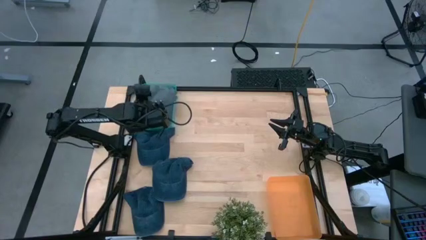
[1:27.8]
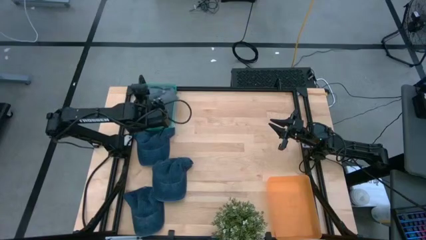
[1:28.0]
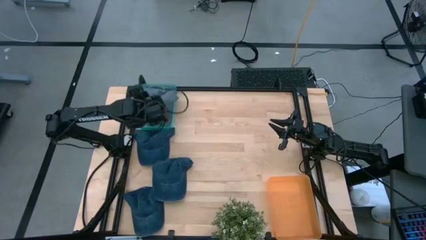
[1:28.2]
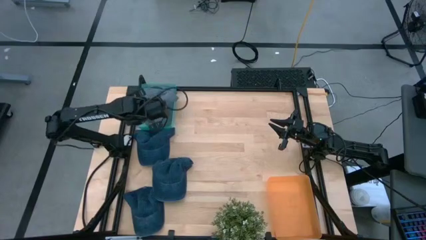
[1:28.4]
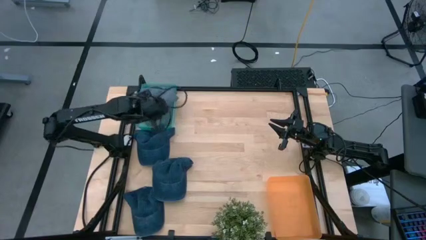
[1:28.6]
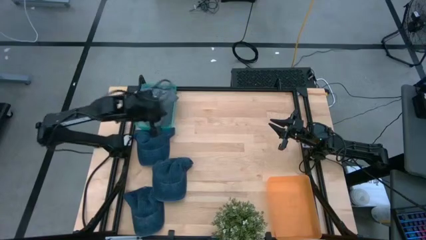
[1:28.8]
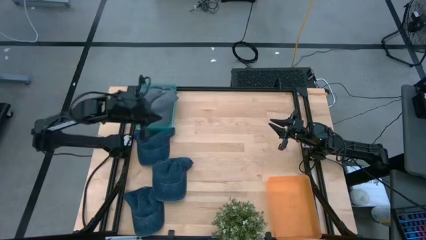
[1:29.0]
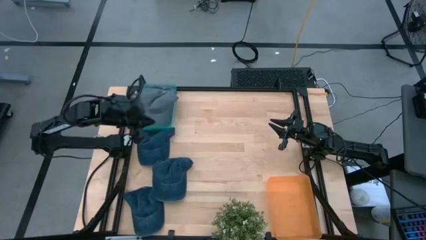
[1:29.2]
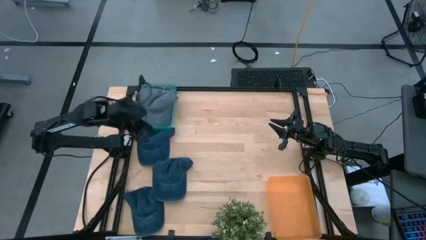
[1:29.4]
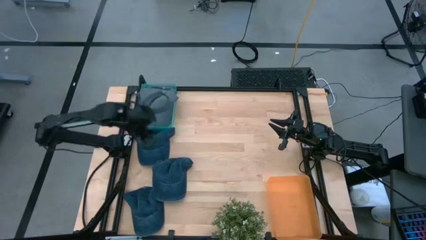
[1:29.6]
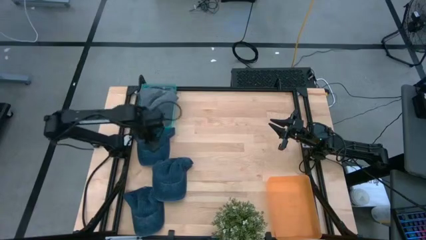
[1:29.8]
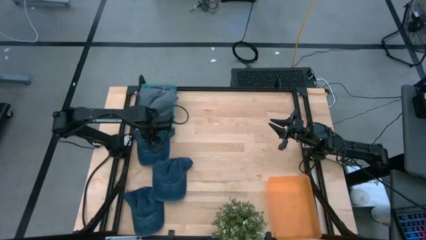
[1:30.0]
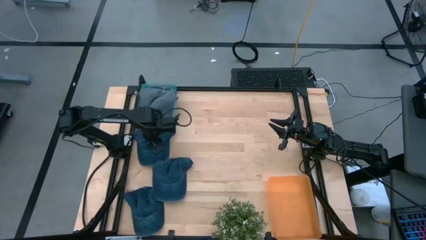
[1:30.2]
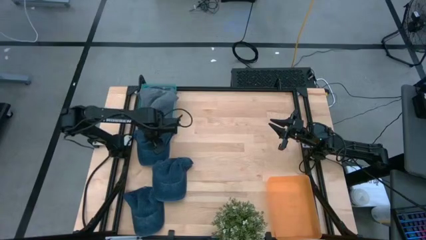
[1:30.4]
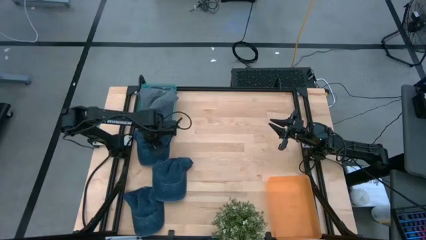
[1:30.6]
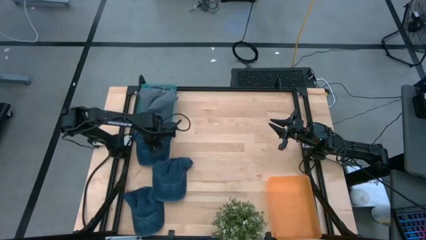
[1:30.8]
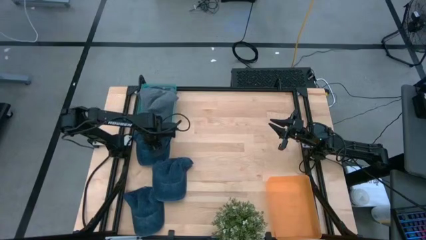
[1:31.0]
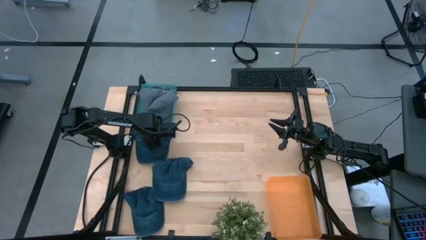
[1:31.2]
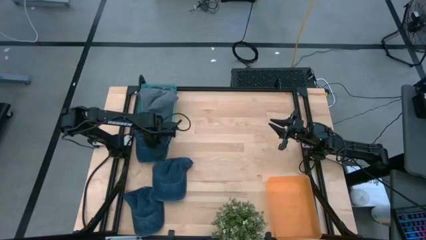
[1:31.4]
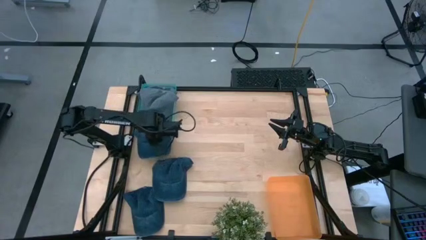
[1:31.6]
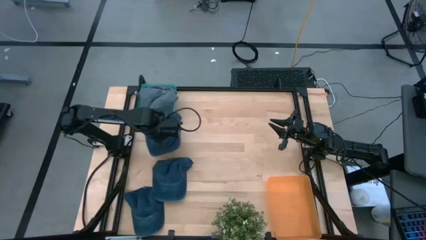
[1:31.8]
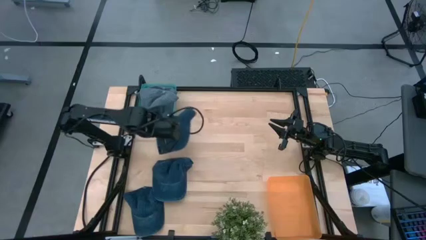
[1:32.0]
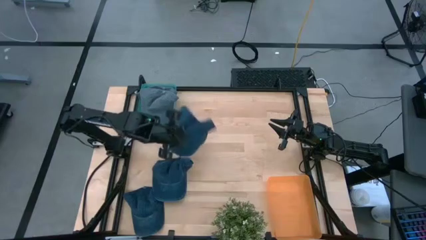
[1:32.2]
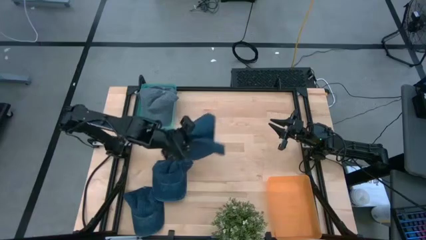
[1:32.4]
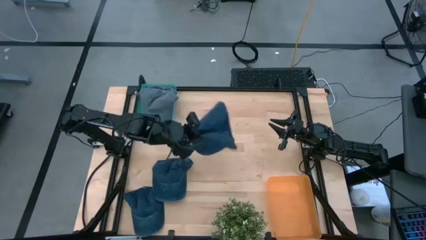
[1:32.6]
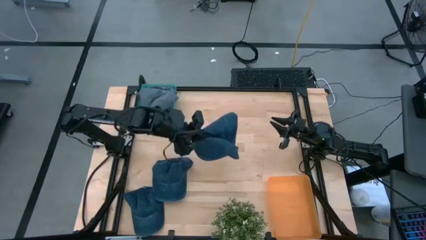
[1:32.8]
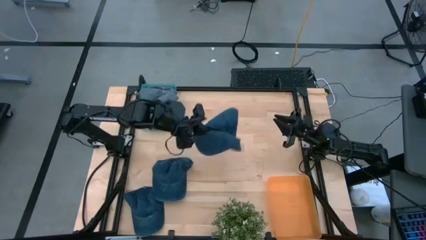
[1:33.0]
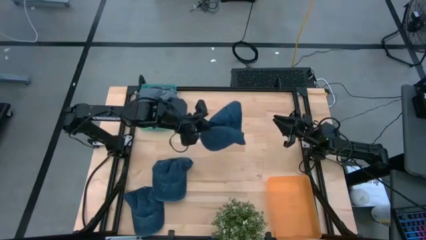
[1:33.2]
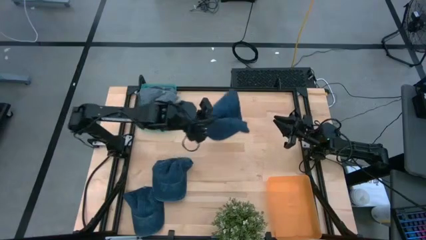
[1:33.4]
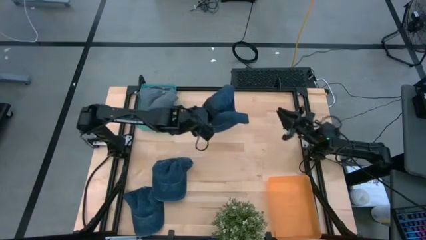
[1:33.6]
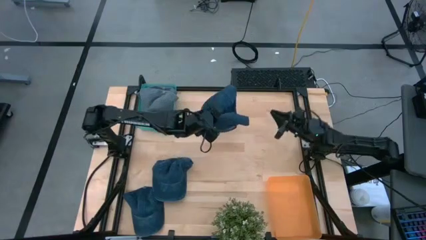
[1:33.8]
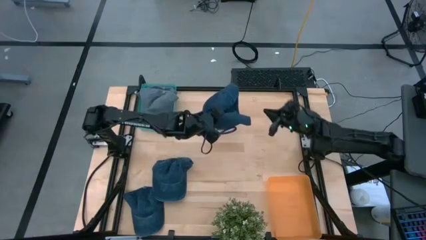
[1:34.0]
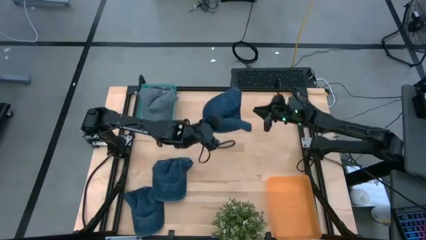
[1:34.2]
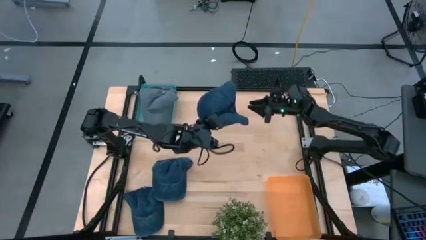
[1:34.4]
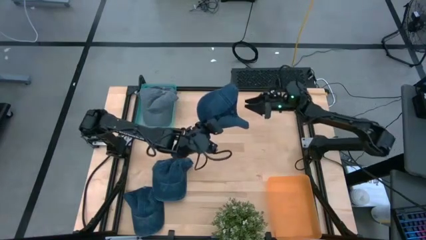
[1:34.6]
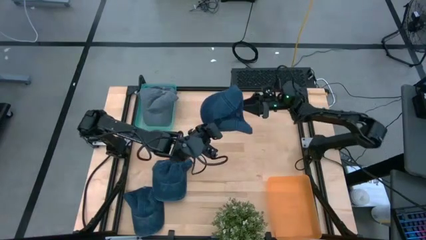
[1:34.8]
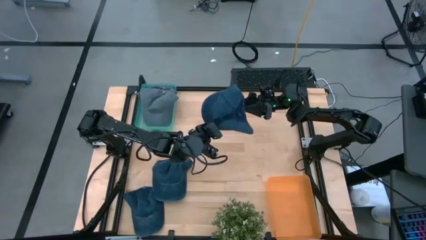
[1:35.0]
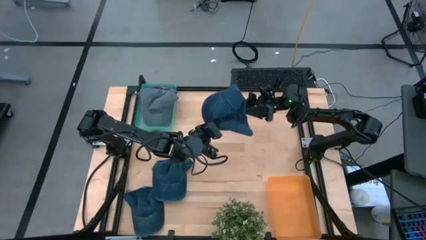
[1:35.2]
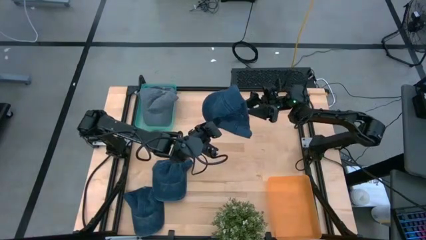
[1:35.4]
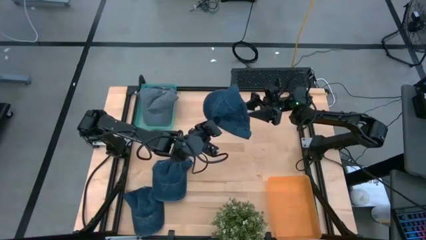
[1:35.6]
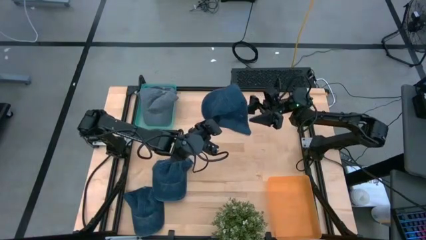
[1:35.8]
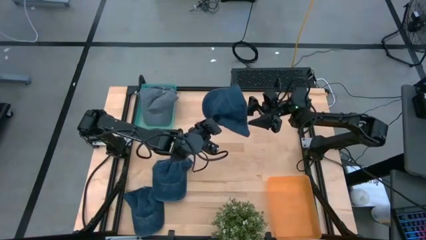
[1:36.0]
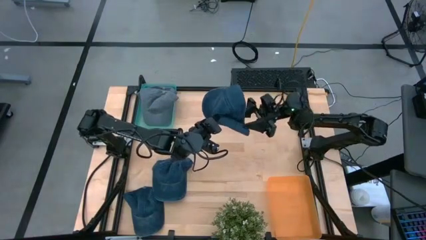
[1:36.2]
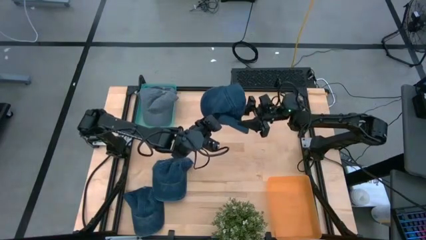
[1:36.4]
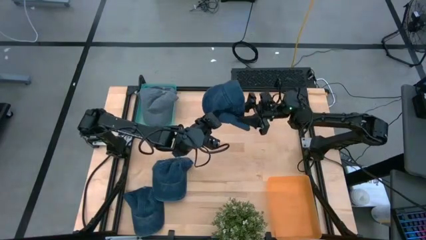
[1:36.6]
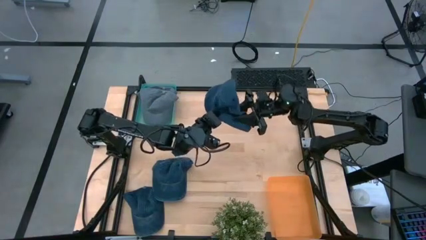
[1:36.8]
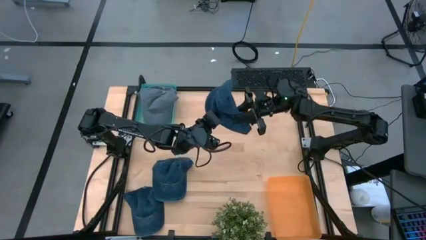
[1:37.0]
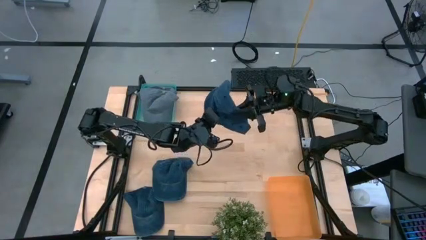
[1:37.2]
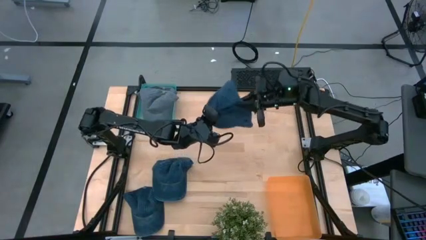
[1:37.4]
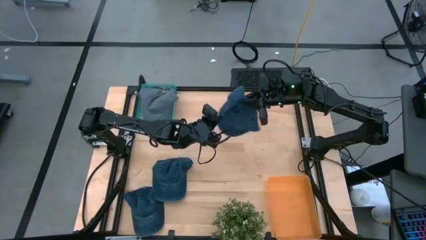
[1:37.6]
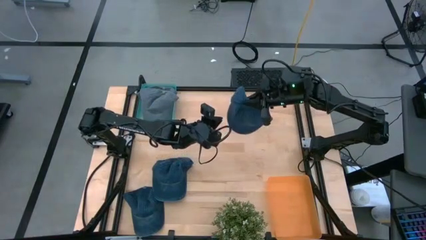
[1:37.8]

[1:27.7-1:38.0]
Task: Pick & Place hat
Put the top blue cap into the orange bin

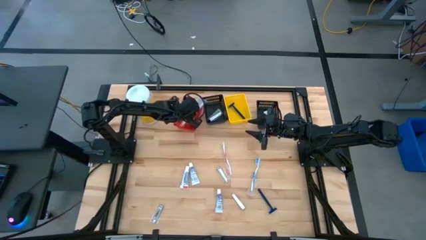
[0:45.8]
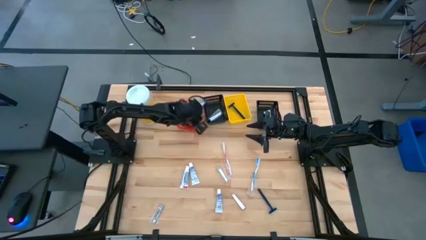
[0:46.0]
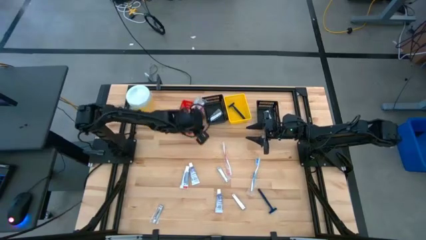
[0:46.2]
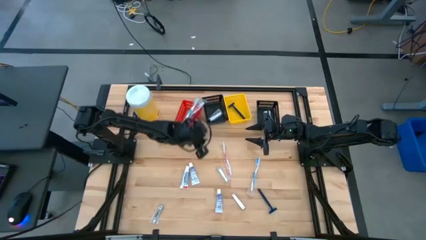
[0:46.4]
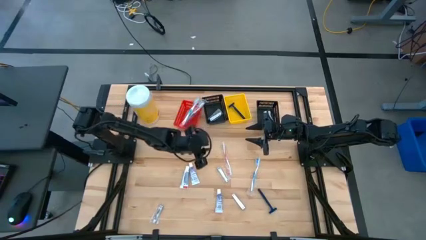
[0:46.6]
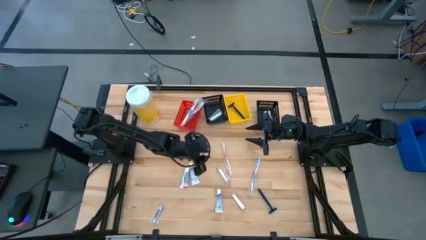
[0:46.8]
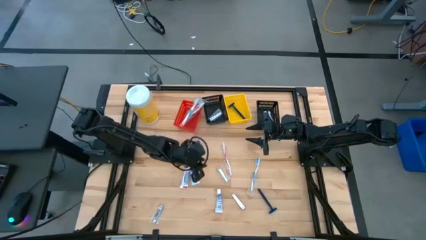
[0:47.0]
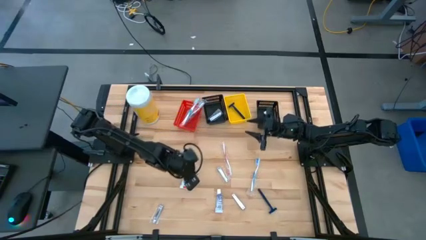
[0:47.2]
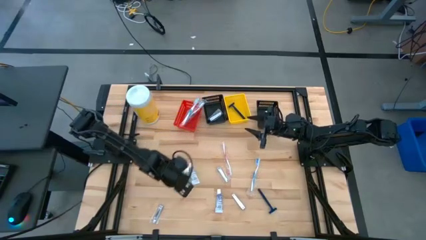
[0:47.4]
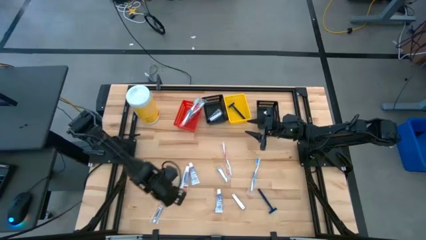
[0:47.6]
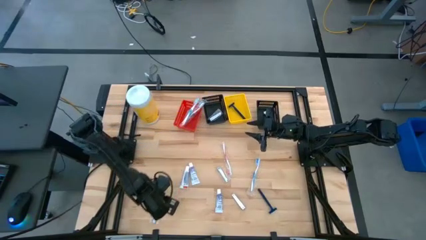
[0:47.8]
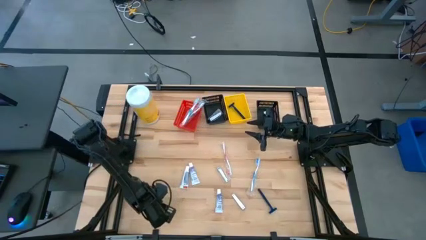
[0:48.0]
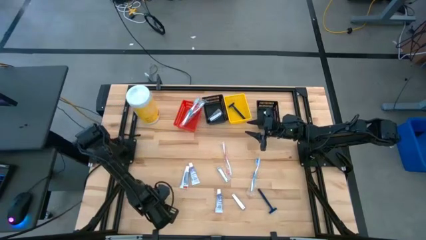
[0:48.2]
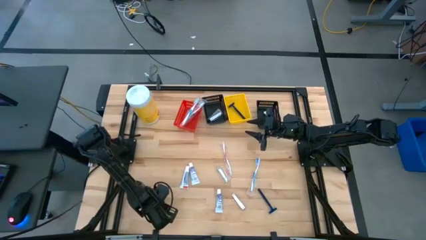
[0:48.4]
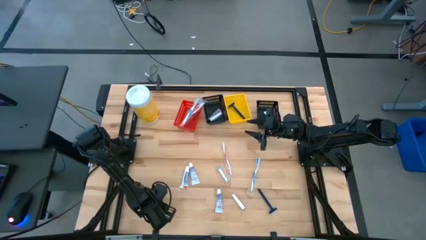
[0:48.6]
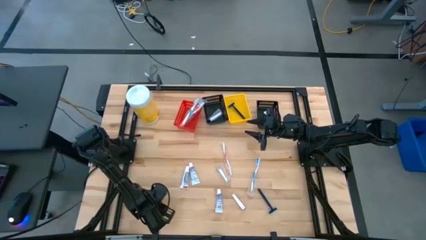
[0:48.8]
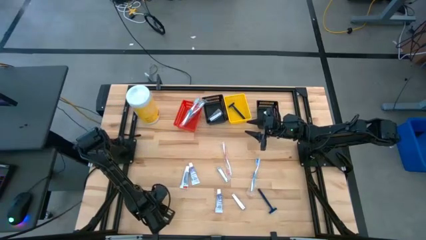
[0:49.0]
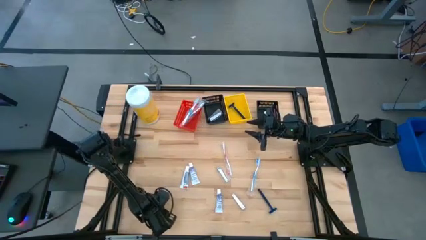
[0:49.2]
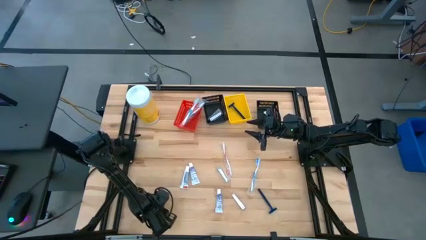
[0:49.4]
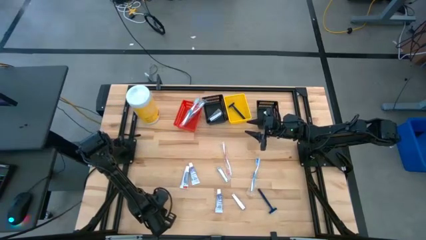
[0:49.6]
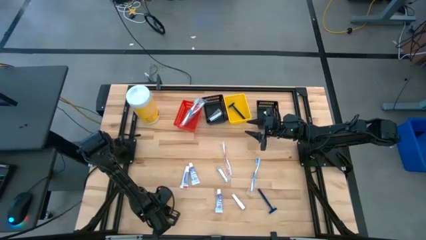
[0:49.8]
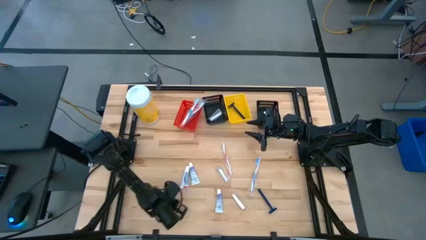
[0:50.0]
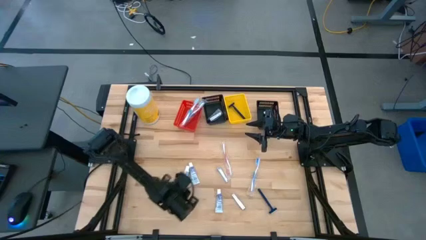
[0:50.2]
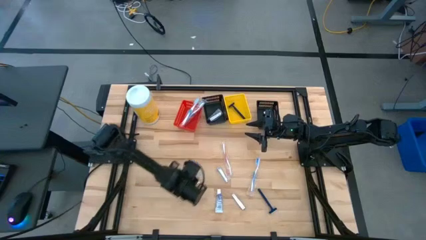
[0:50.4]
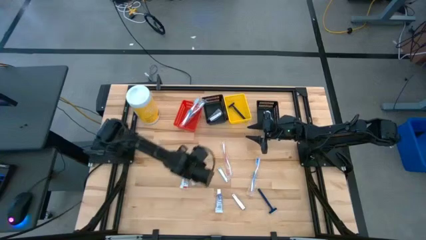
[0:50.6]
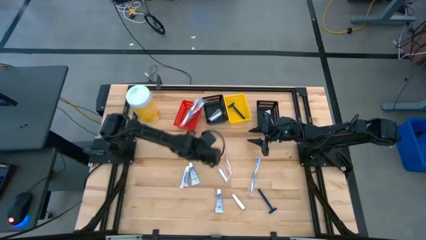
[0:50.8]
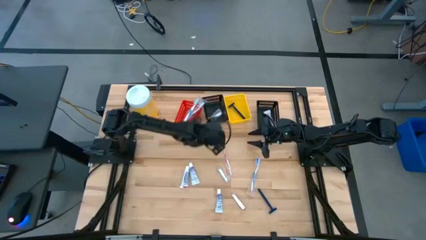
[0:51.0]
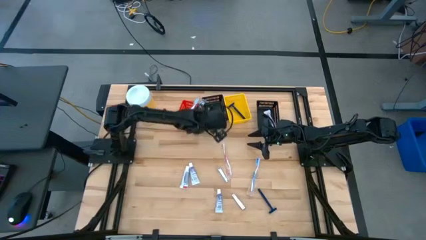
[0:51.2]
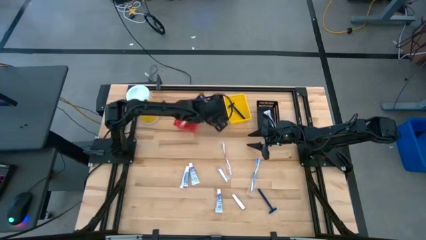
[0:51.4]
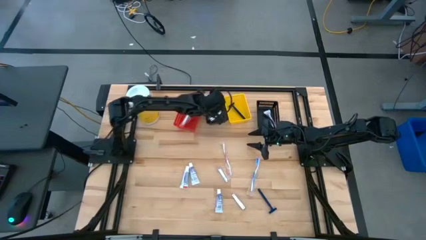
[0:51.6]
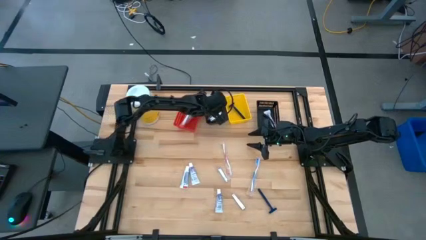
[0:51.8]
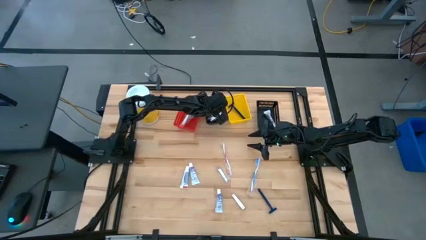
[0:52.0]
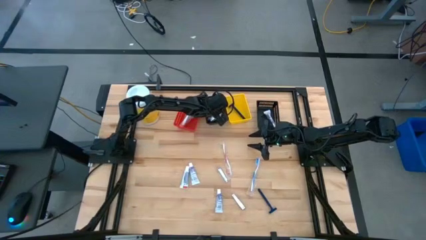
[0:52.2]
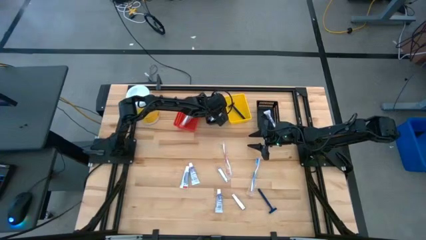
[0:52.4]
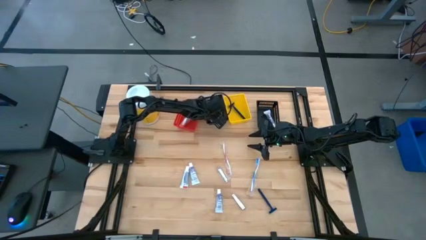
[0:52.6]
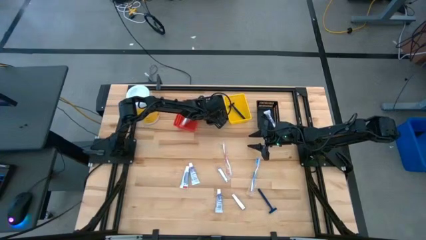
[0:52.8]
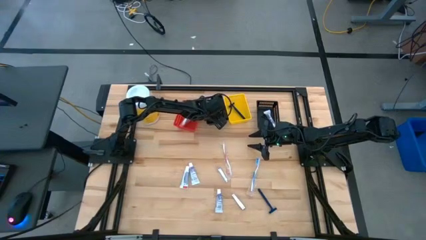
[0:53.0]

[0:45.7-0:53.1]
Task: Pick & Place Travel size toiletries
Put the silver nail cutter into the left black bin
